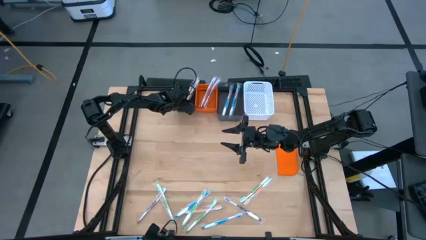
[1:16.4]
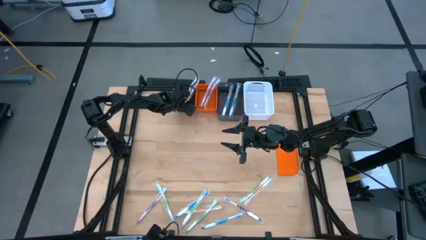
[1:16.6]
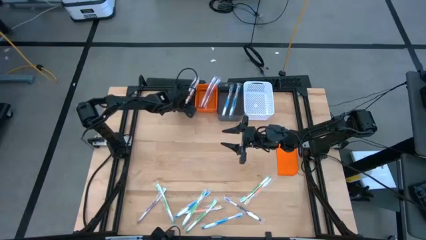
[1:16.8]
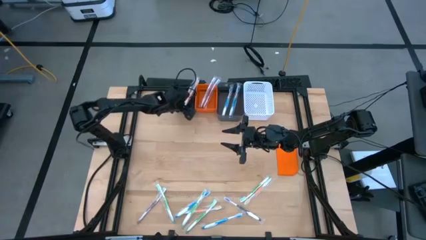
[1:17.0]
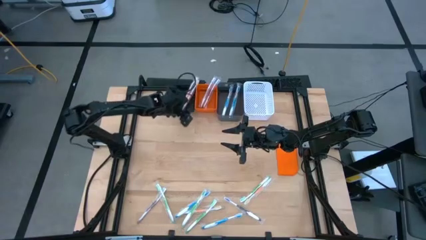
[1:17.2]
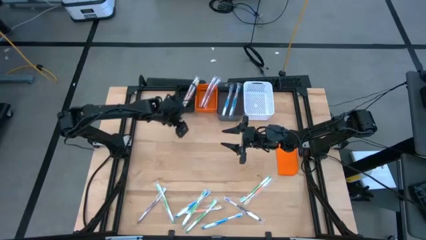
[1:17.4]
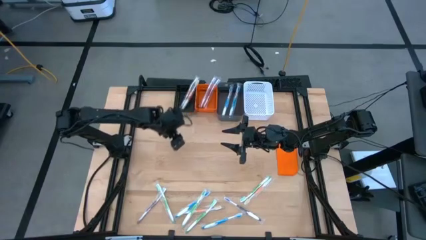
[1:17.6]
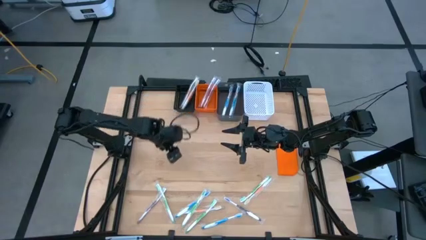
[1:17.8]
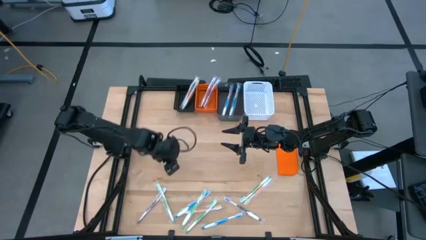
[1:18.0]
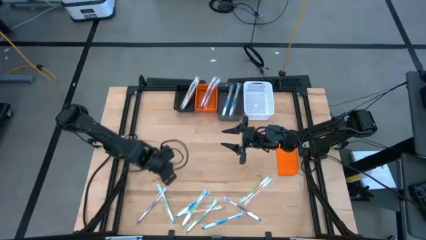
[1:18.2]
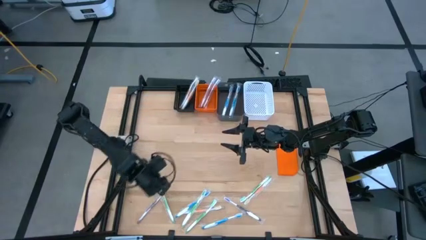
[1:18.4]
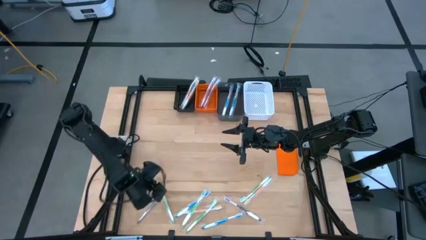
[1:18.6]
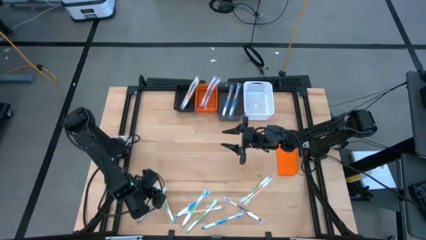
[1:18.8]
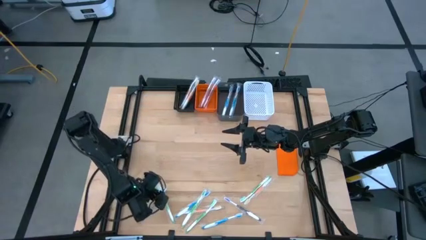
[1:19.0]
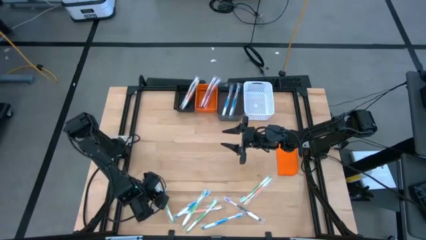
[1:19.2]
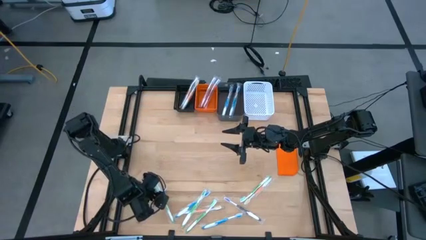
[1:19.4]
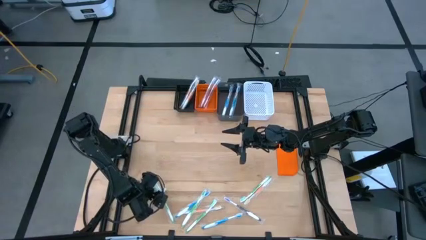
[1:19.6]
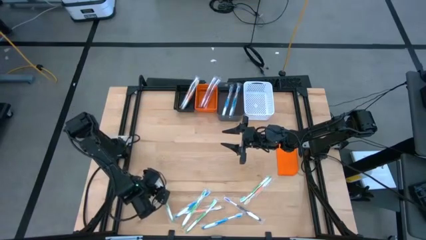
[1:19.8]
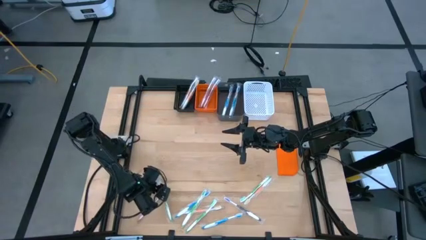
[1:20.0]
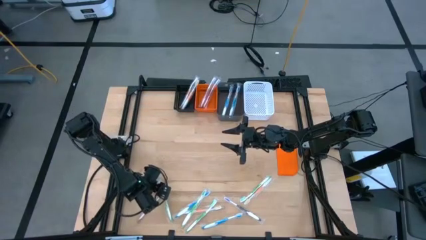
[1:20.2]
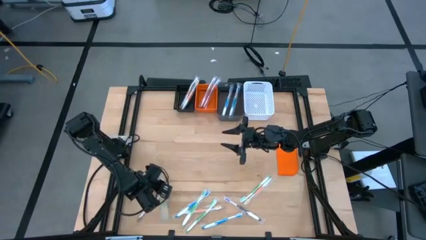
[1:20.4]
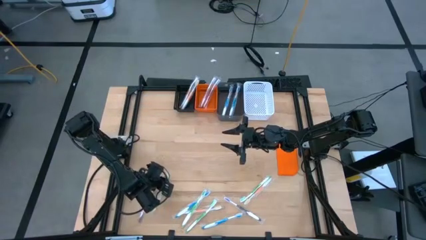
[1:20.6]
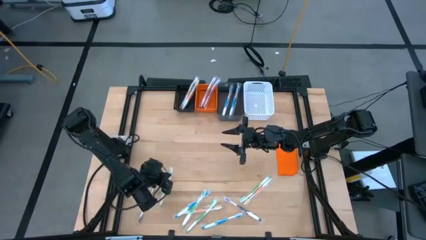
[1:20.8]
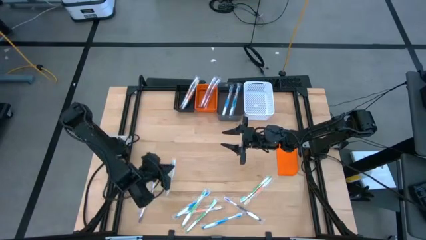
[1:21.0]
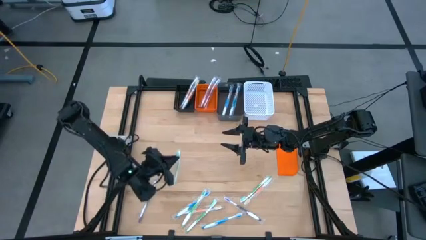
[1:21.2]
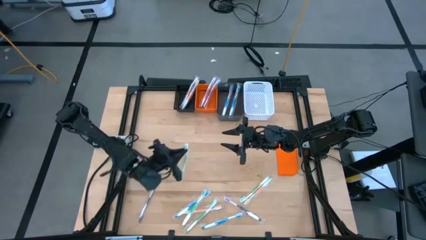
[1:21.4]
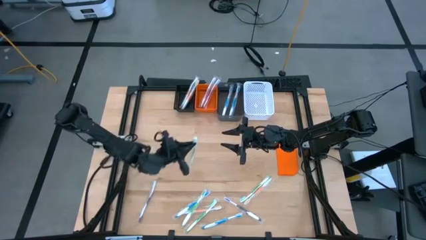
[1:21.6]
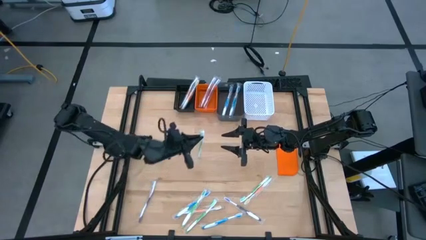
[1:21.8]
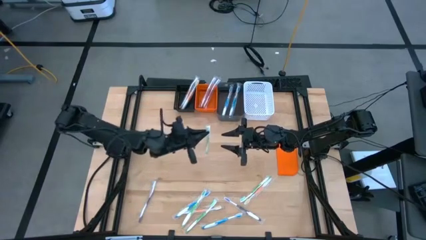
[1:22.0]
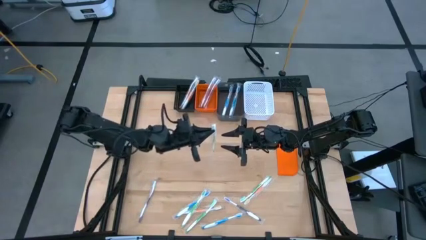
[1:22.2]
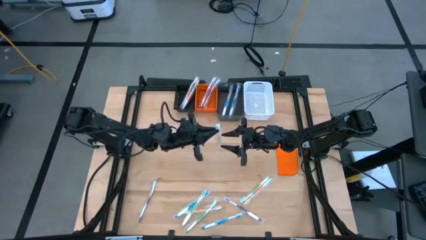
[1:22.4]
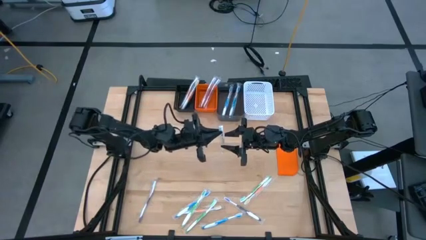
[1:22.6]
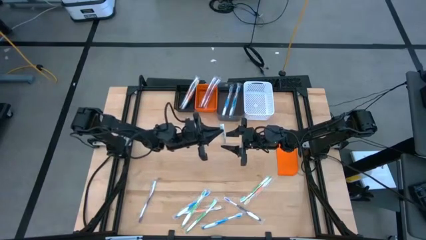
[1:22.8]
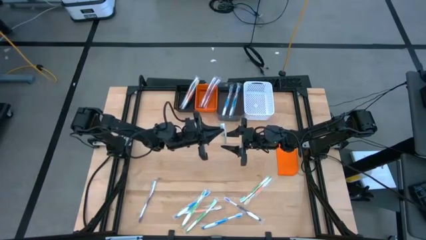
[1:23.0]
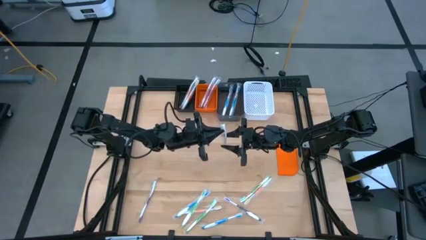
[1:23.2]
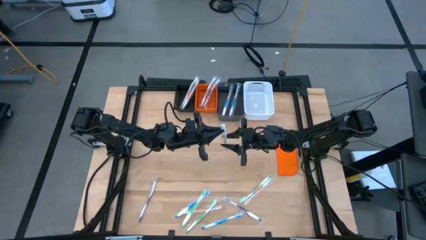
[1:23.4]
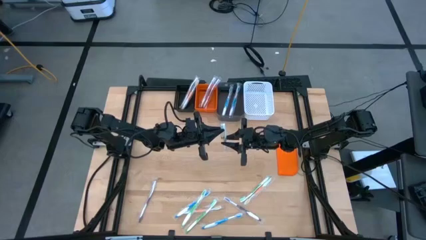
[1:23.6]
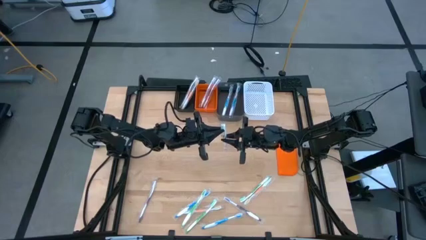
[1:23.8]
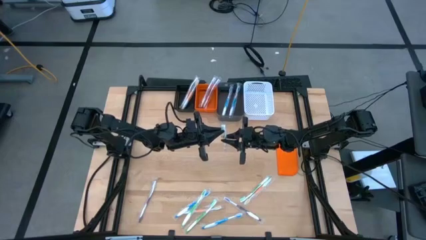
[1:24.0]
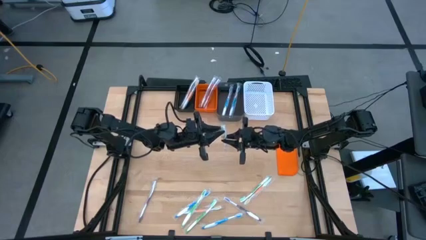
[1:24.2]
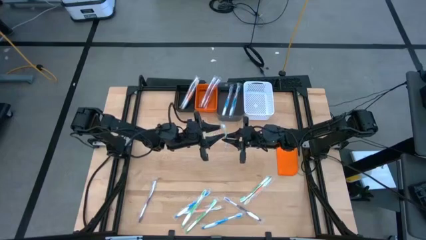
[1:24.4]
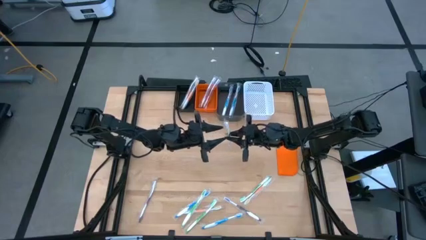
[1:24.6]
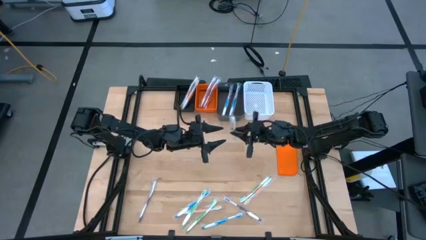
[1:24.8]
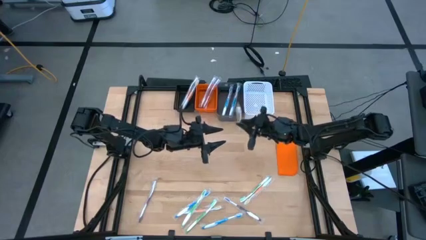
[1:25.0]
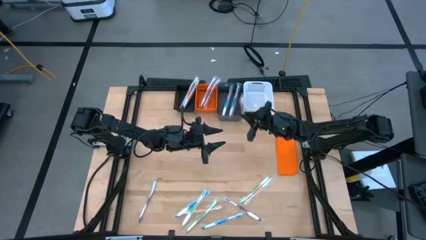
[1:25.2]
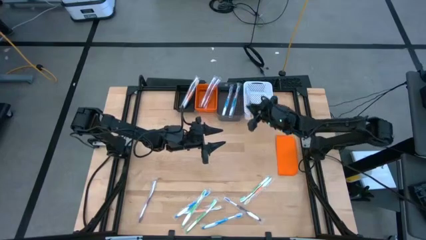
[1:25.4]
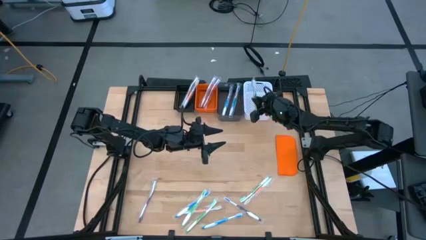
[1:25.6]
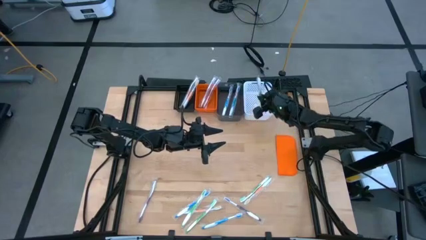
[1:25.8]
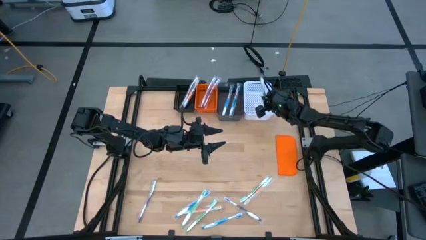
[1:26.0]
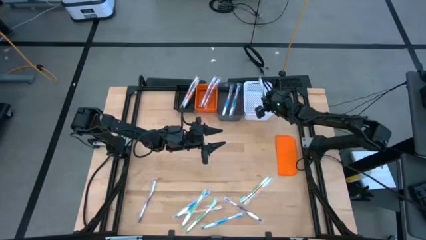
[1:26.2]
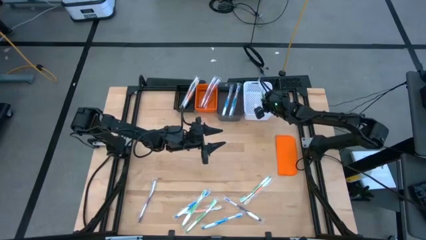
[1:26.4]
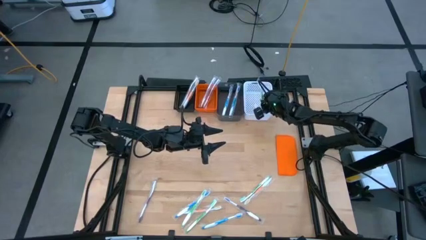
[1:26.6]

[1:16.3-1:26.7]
Task: Pick & Place Toothbrushes
Put the green toothbrush into the white bin

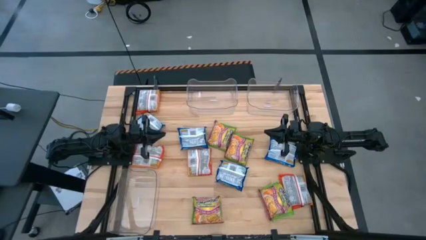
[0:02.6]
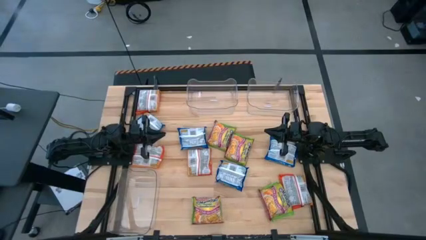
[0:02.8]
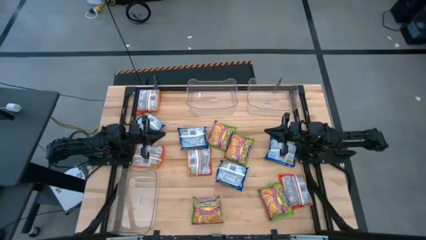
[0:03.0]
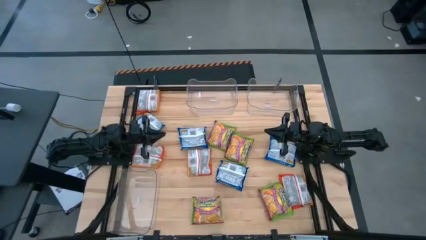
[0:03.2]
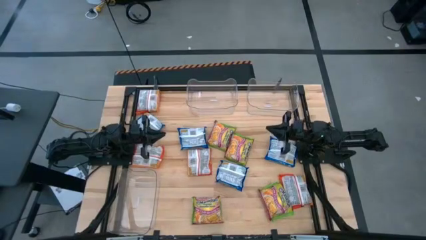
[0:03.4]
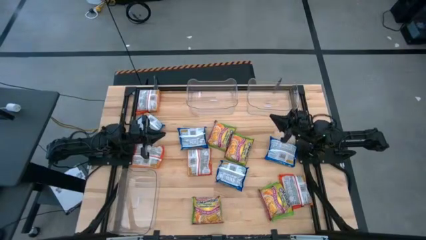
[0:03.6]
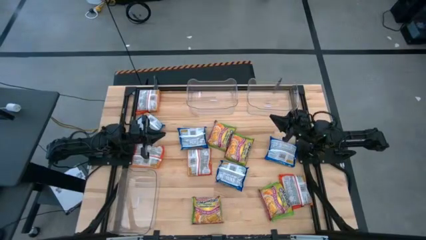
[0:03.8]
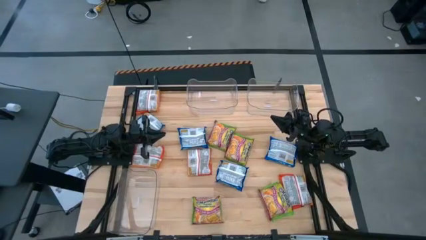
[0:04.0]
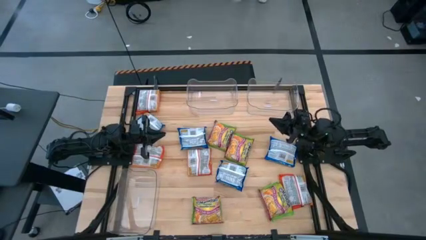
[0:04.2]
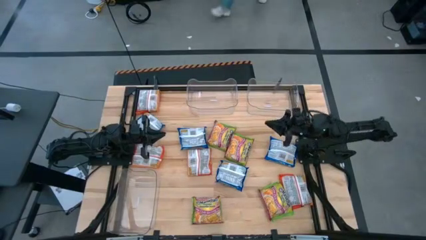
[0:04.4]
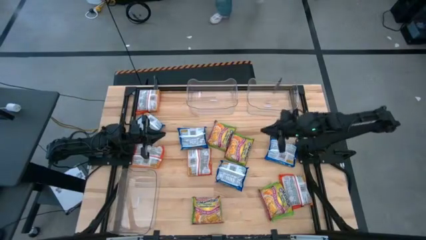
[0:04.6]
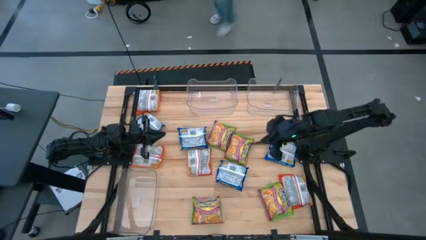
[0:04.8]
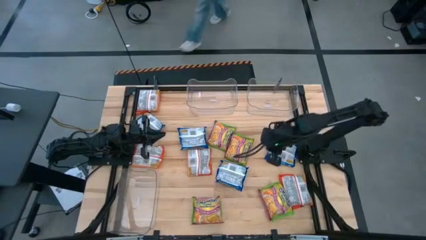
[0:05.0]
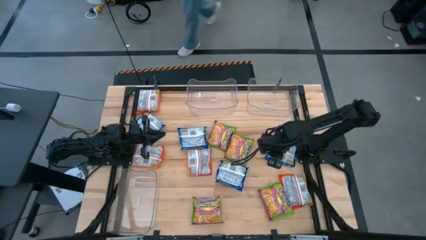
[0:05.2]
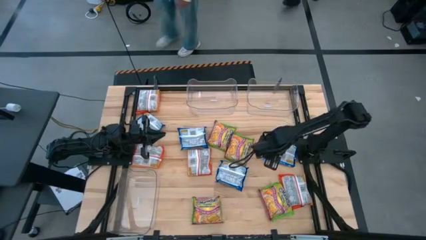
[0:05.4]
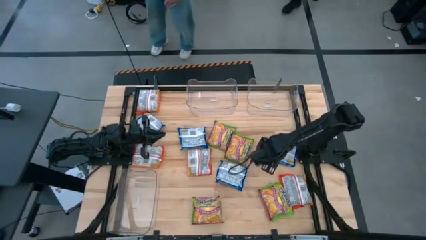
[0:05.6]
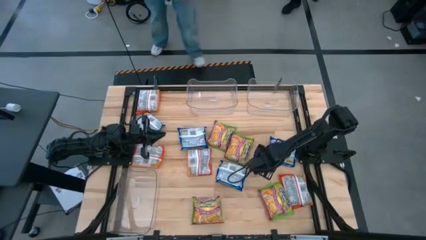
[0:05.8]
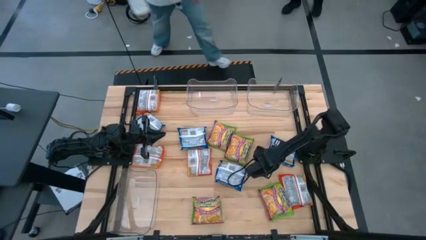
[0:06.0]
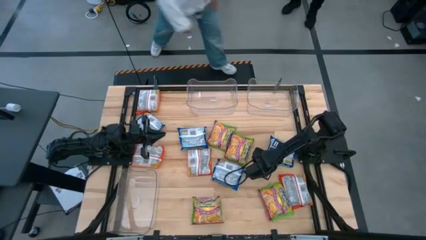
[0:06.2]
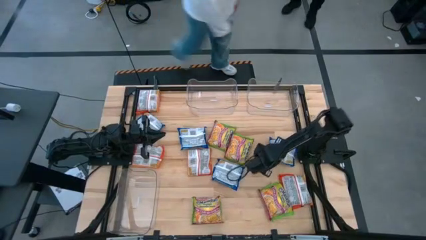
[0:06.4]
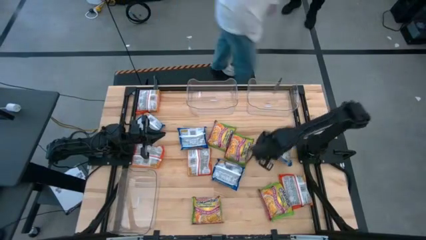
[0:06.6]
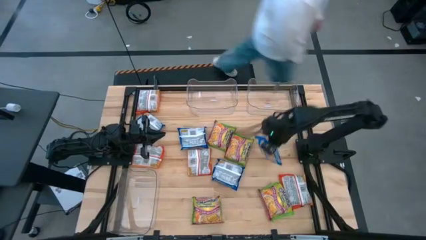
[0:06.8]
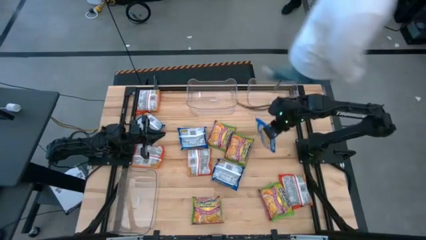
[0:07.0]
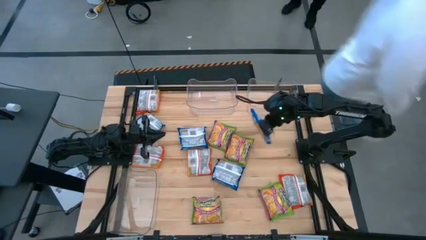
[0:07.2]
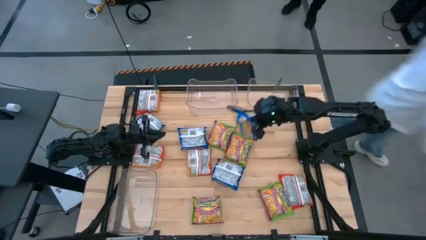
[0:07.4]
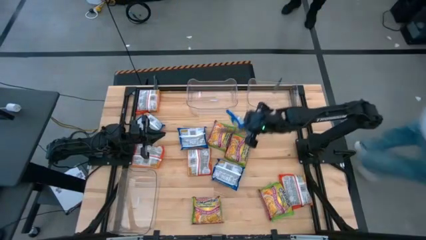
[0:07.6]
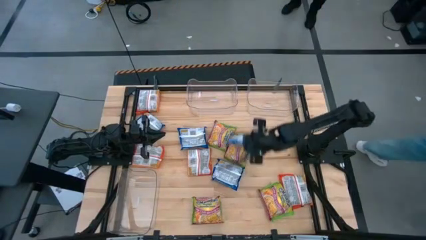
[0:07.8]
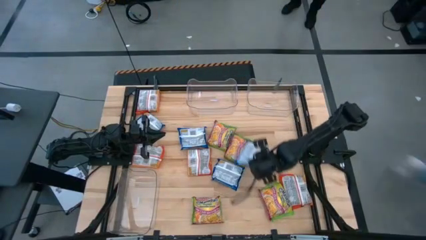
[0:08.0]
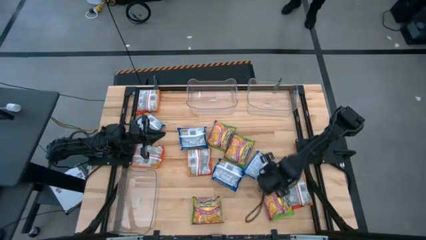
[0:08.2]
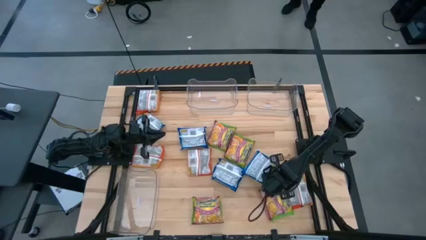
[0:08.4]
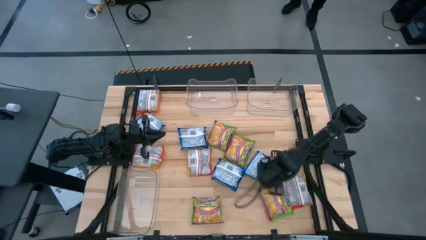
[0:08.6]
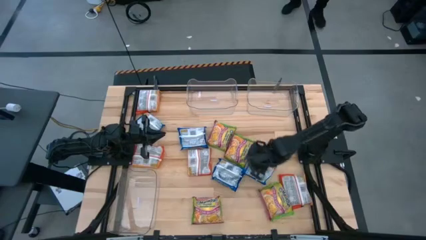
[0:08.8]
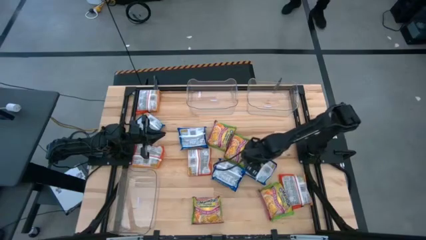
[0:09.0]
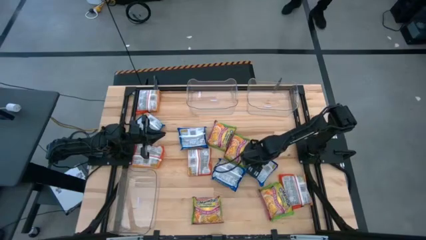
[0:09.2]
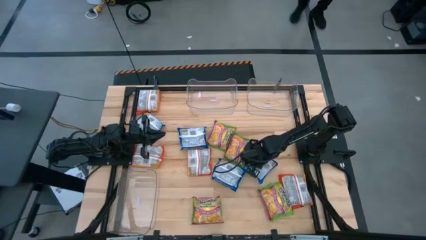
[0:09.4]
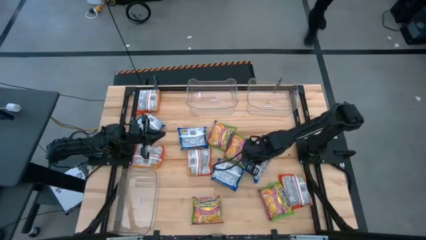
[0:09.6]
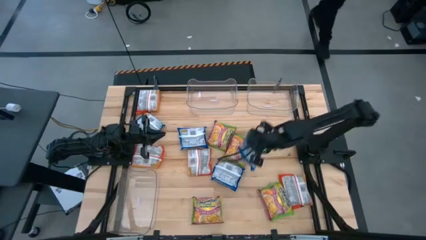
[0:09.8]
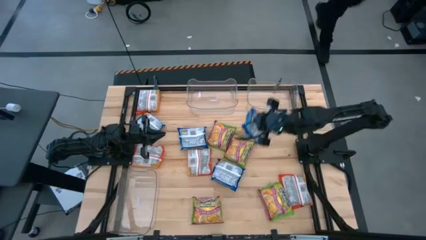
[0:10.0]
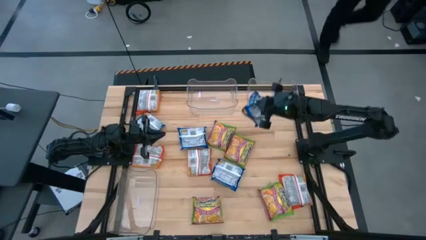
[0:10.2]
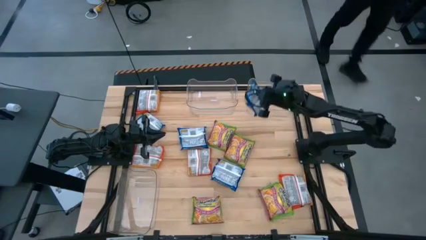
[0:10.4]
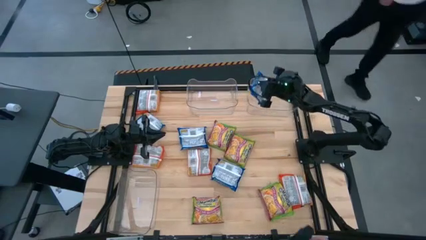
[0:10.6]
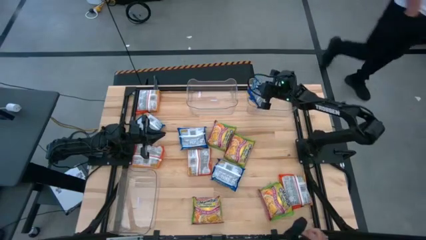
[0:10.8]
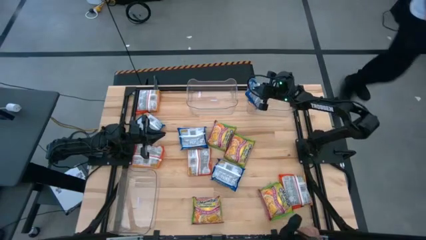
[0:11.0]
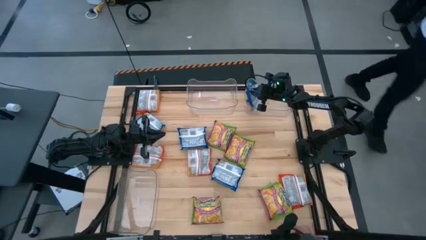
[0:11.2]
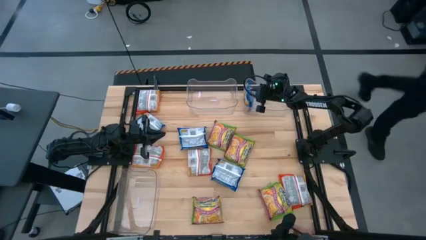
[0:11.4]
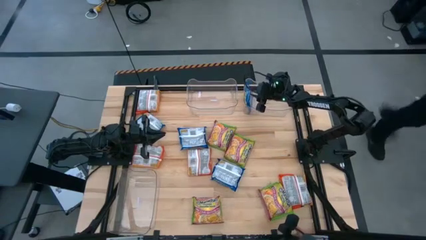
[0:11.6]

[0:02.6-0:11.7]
Task: Sort Maruchan noodles
Put the blue noodle pack into the top right transparent bin
